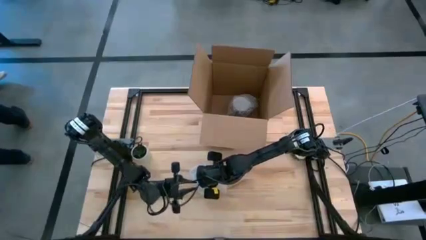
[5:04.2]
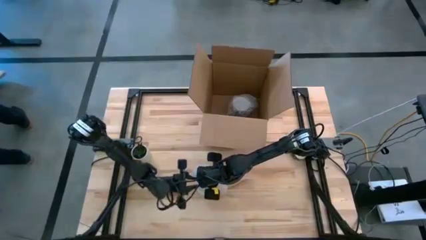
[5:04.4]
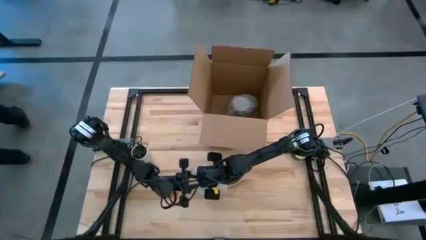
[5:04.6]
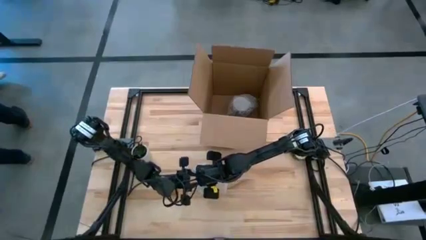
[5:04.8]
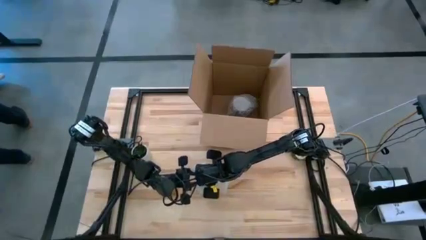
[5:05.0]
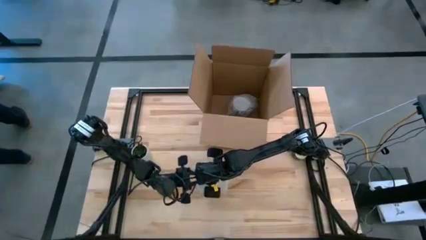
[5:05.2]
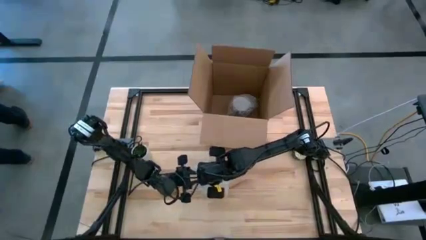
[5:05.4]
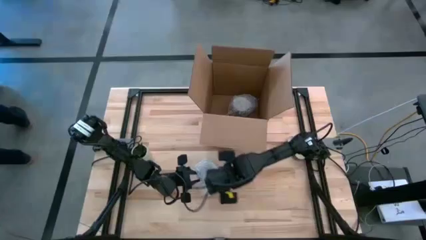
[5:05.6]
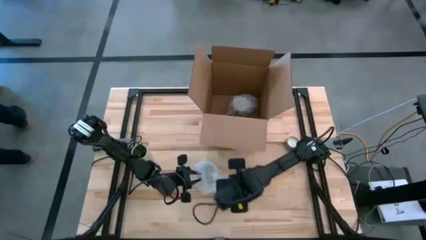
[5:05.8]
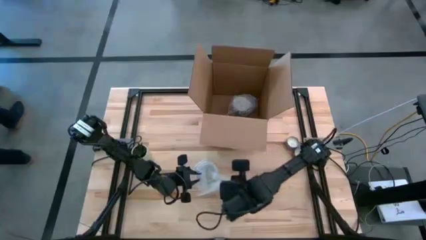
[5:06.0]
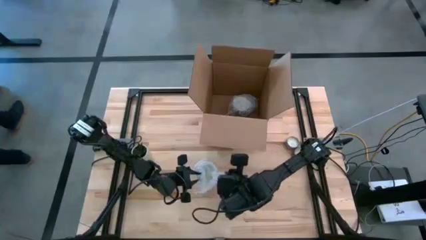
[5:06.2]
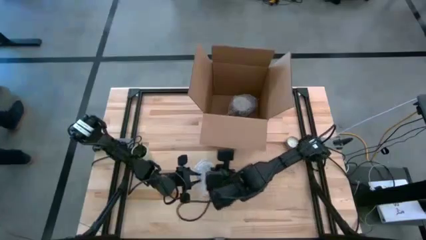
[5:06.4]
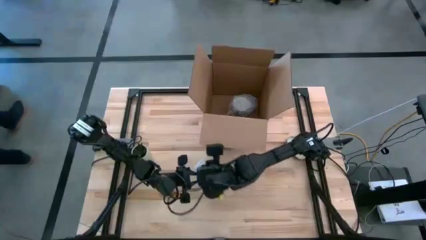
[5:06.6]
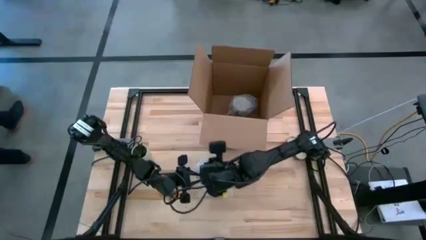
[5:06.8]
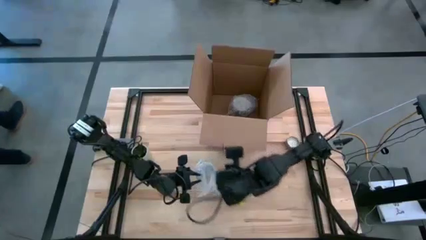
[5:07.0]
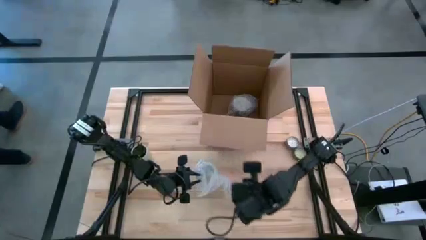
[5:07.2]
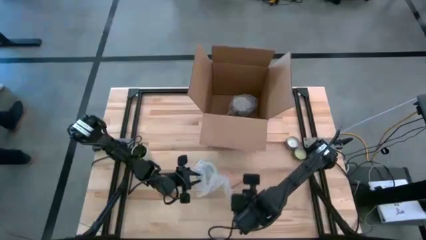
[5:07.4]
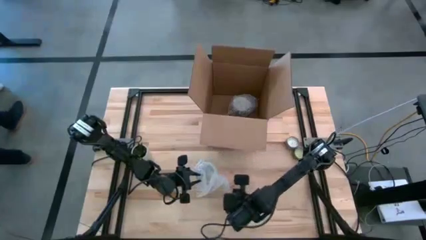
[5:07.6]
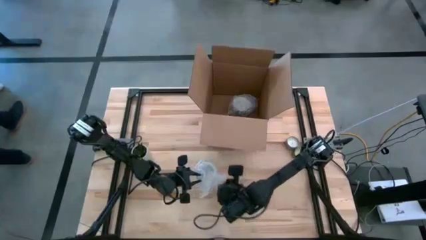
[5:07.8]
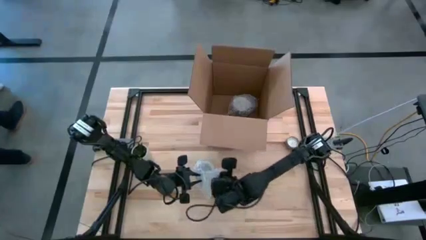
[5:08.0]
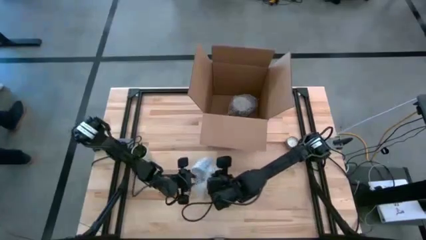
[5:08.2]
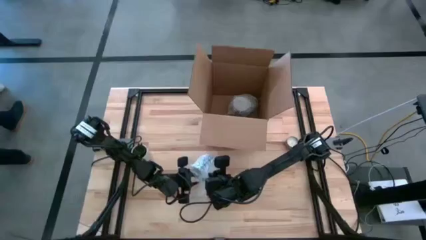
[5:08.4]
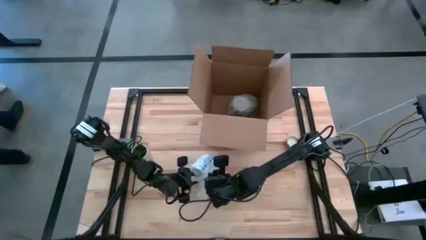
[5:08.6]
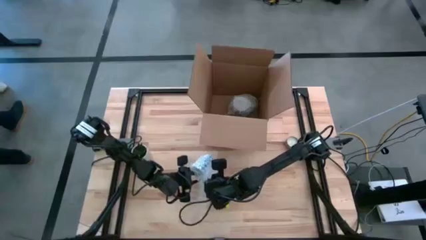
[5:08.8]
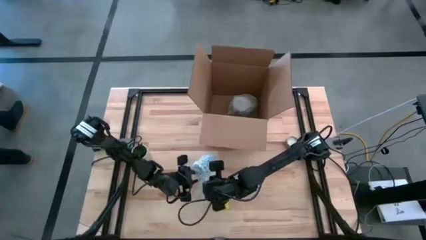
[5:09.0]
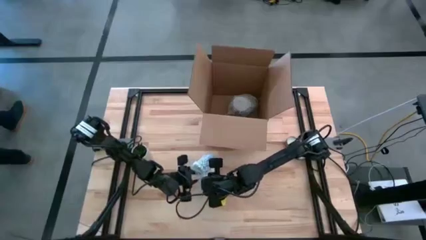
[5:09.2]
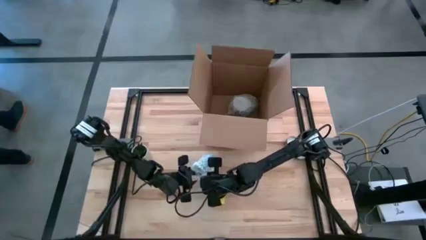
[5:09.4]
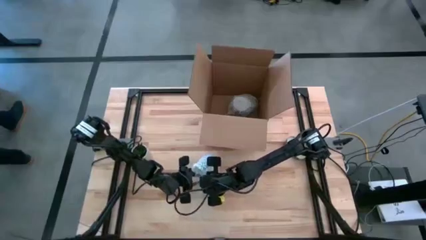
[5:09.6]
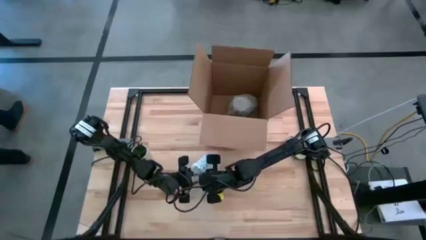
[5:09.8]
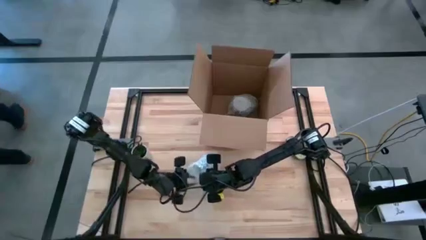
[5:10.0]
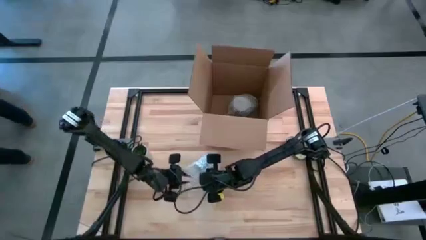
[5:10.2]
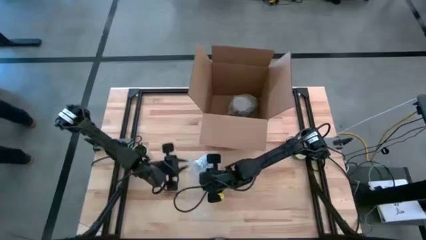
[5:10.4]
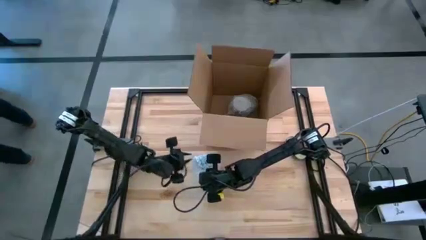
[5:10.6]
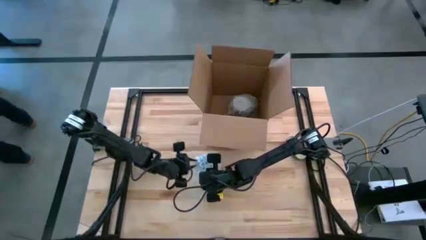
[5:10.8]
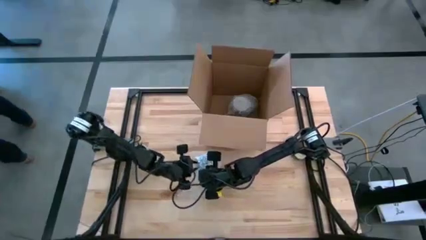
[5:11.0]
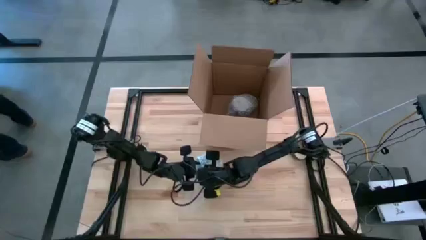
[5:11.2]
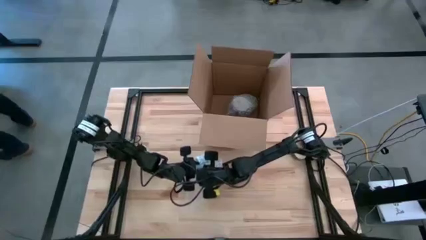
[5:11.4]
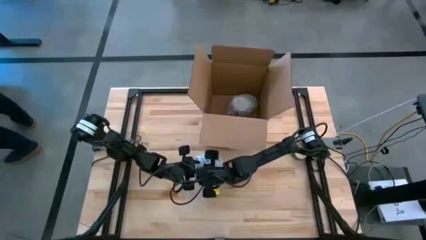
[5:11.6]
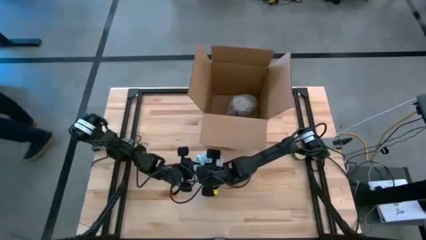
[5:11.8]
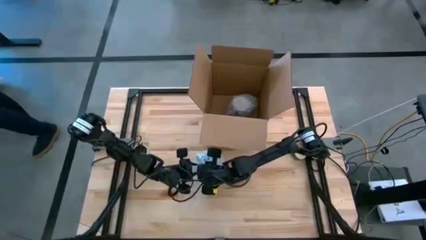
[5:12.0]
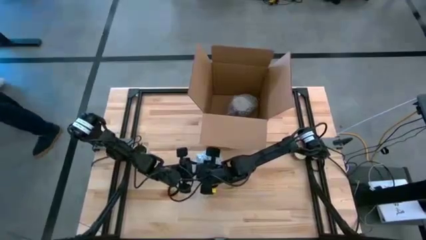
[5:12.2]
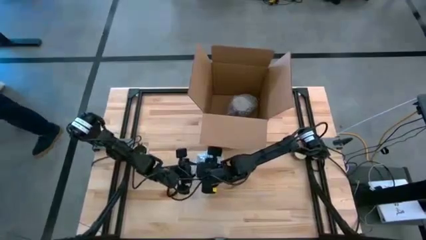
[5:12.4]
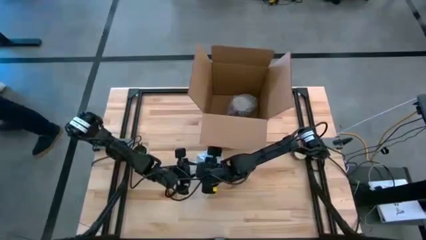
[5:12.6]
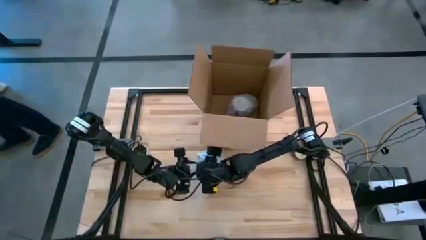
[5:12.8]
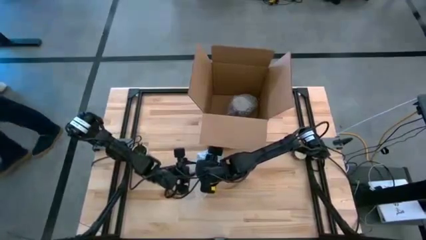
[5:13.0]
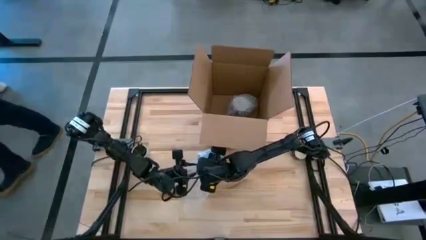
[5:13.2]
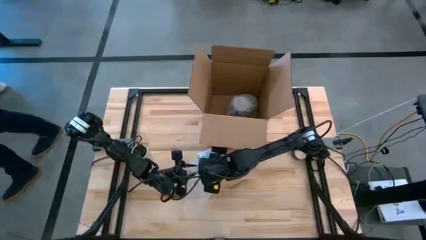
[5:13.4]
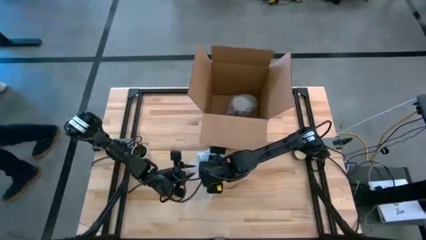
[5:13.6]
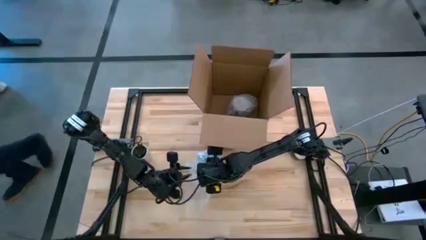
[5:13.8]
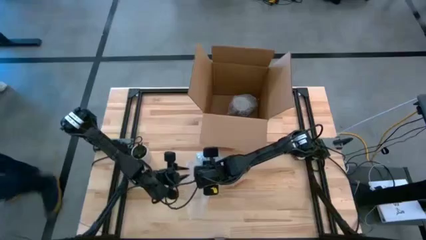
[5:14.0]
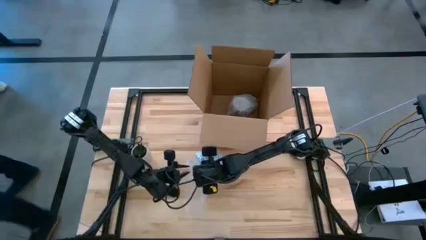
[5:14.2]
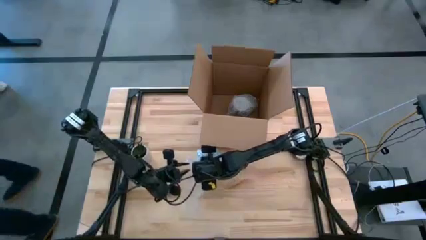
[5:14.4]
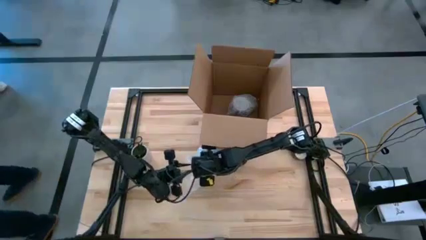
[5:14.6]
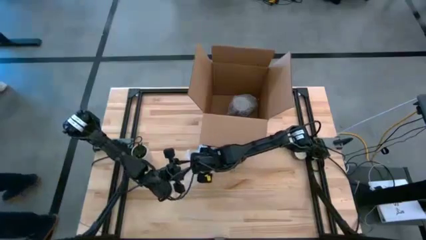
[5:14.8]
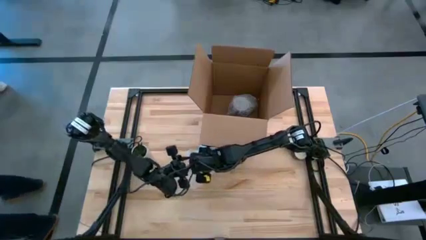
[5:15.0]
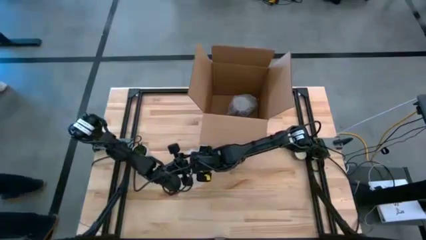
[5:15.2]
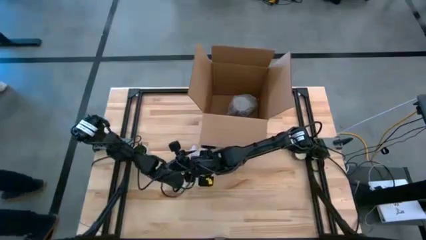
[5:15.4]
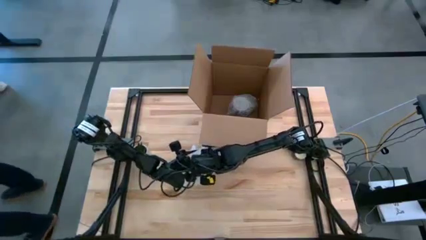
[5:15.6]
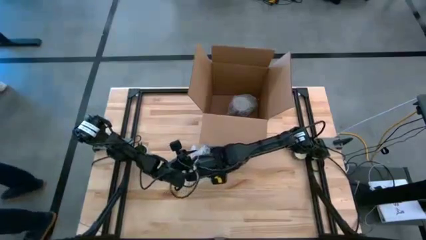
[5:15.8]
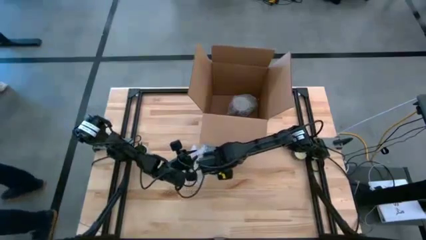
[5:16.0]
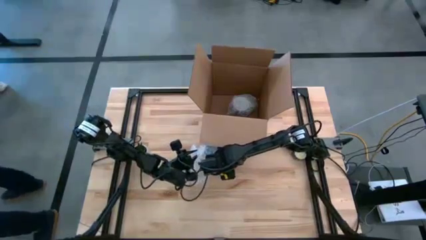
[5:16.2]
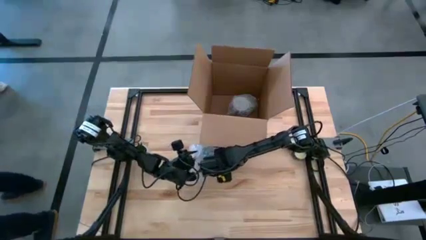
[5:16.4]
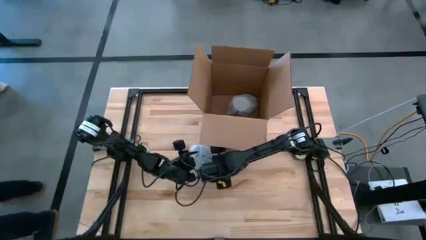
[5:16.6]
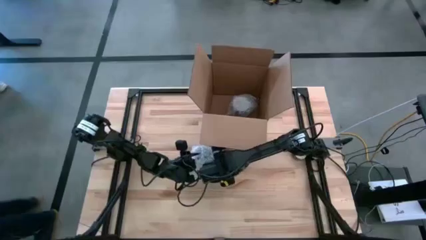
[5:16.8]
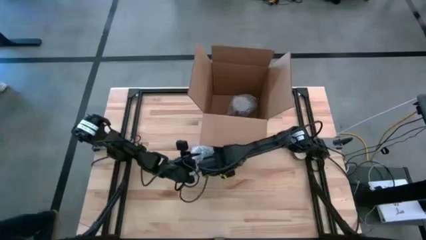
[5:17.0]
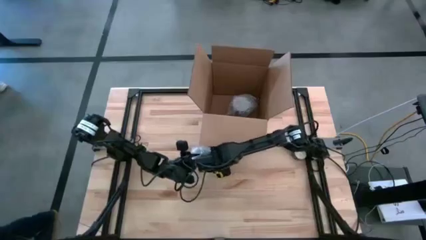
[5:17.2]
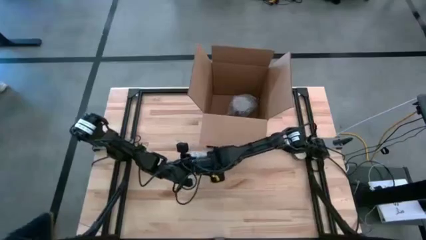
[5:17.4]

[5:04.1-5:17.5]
Task: wrap mug
Wrap the blue patterned mug with the bubble wrap

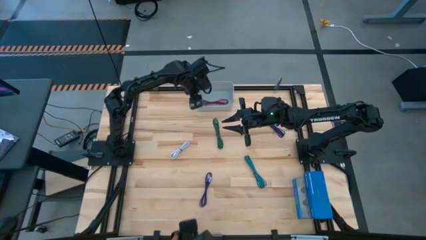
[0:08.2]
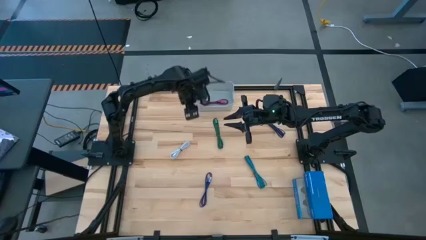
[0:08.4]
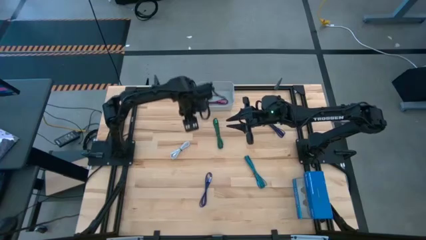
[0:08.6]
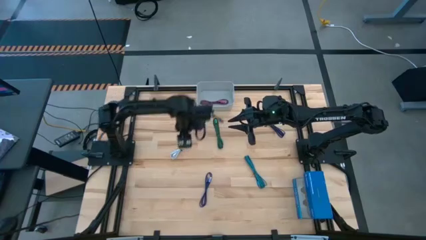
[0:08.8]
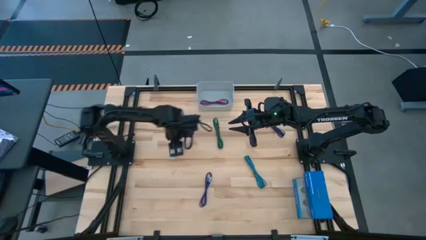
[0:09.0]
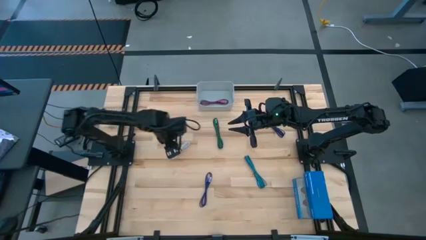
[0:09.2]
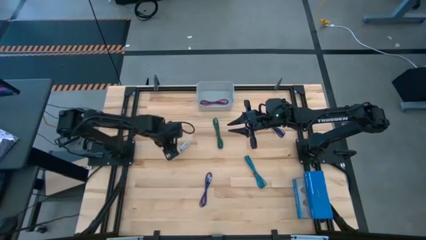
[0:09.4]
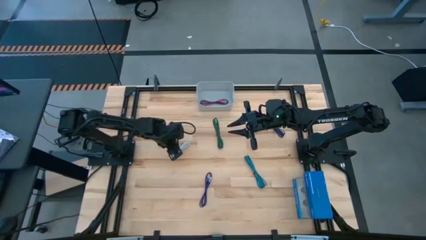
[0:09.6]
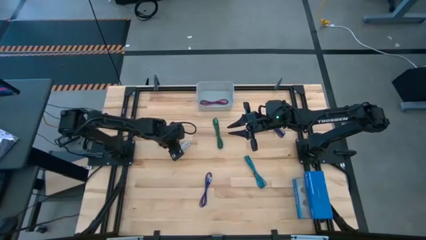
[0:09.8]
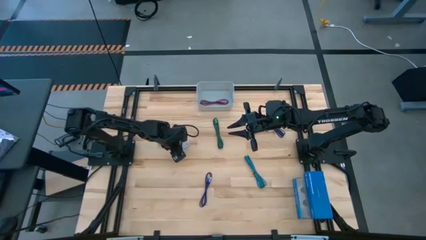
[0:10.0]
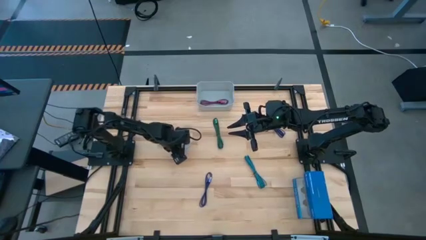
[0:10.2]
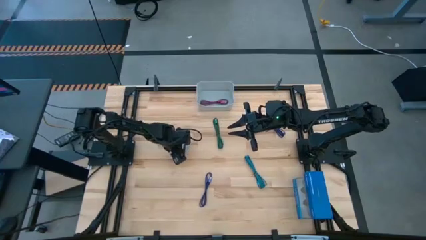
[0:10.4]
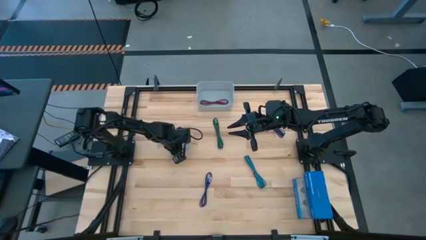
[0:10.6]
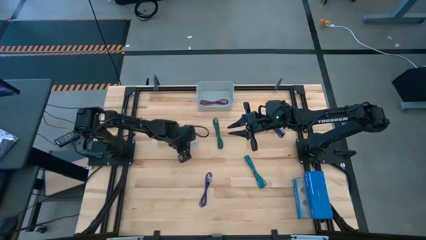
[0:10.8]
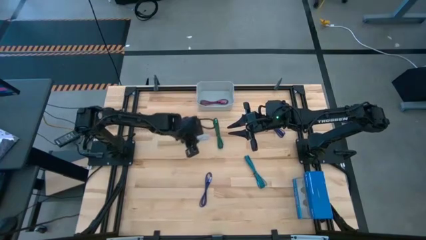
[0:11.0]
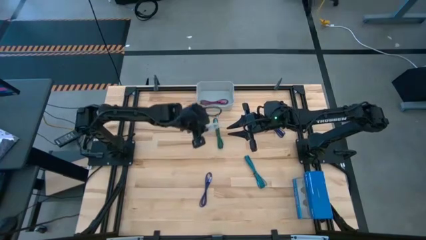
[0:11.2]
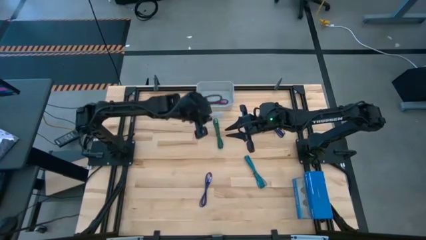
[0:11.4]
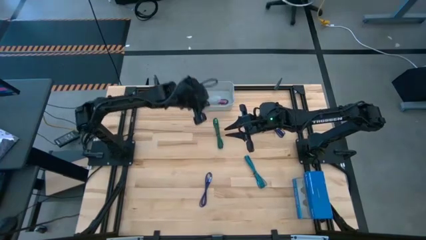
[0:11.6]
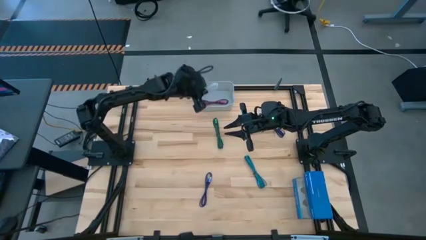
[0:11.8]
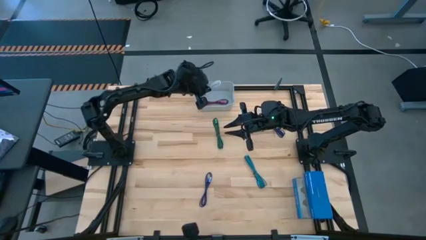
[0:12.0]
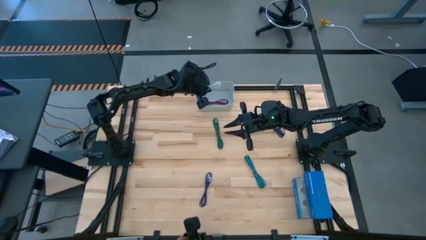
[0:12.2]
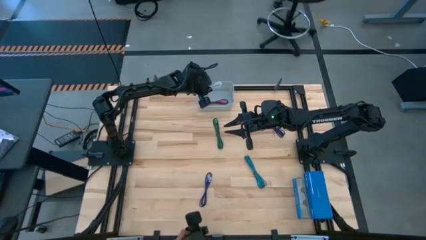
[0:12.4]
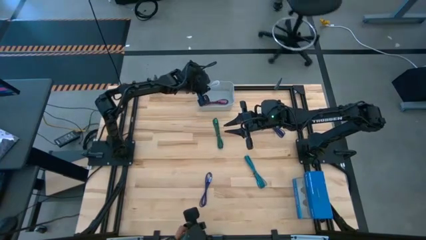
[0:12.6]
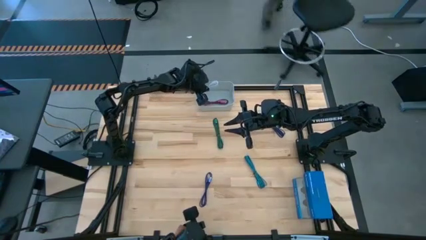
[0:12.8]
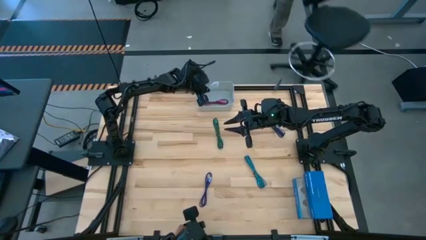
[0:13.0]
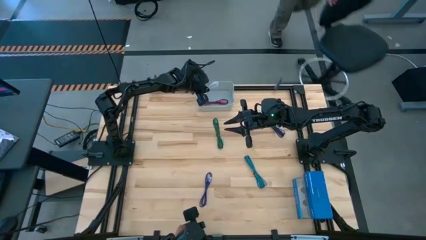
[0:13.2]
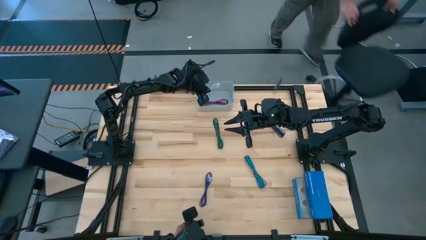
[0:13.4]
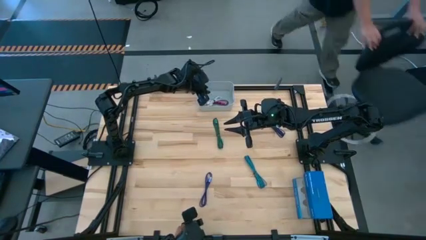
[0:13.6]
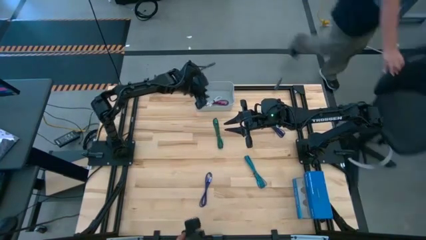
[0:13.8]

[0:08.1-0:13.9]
Task: Pick and place USB-C Cables
Put the white charger cable into the gray bin
